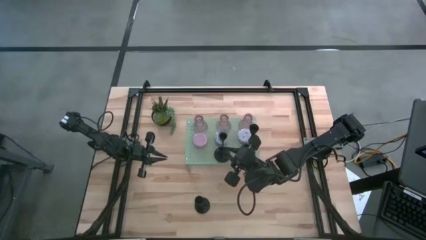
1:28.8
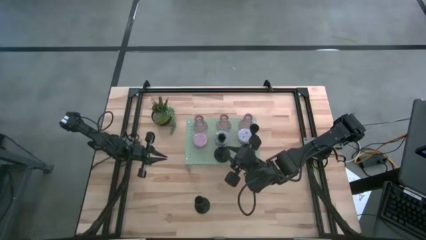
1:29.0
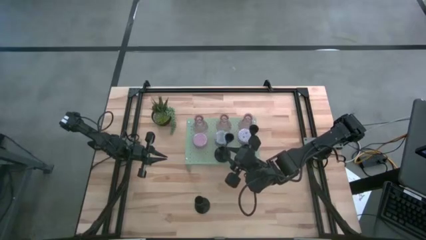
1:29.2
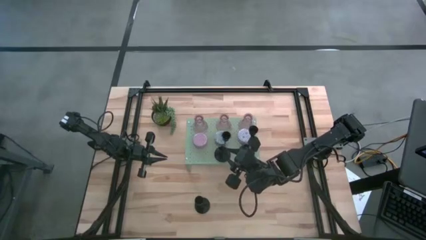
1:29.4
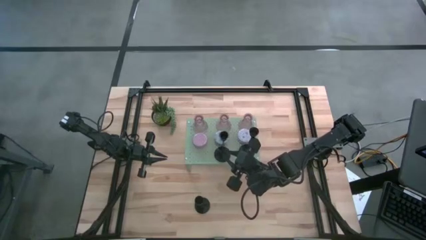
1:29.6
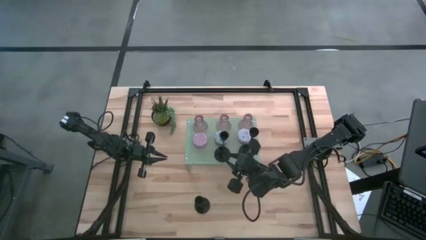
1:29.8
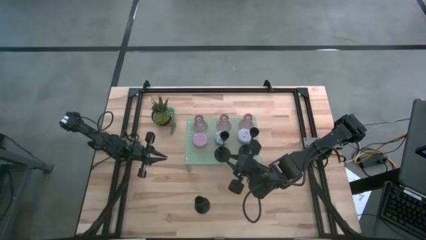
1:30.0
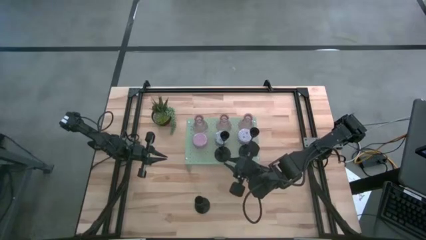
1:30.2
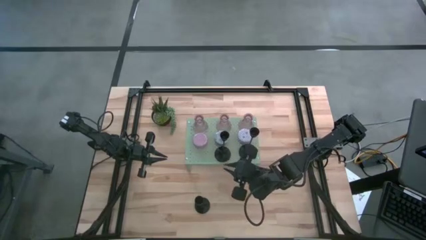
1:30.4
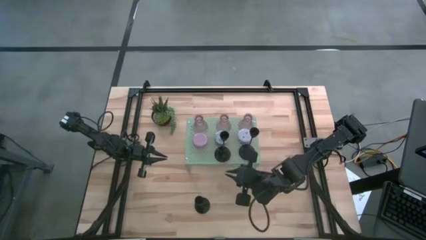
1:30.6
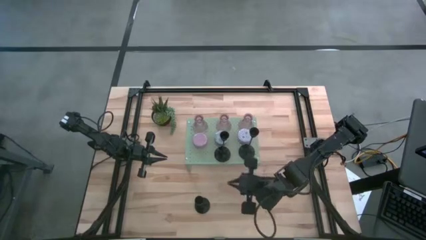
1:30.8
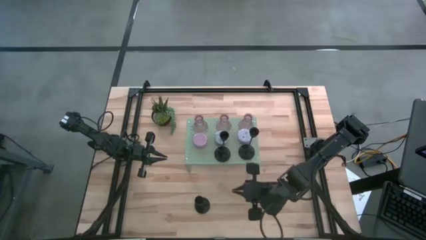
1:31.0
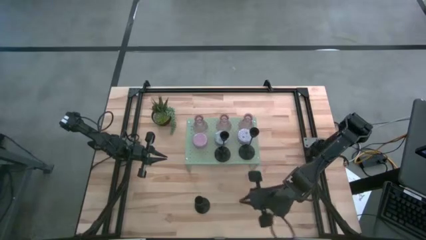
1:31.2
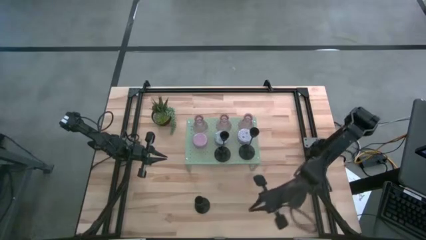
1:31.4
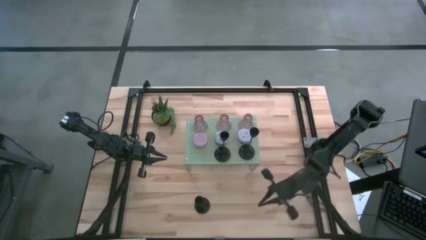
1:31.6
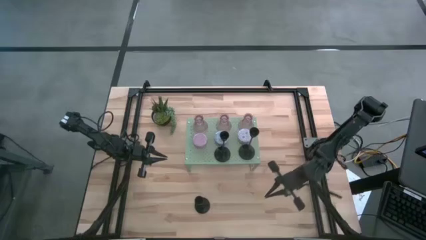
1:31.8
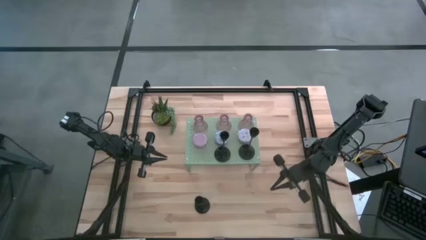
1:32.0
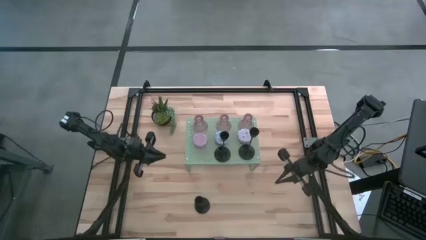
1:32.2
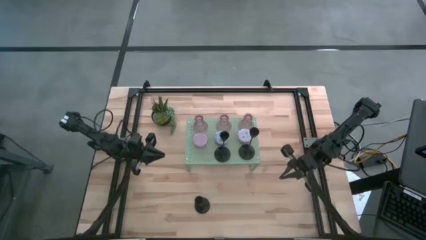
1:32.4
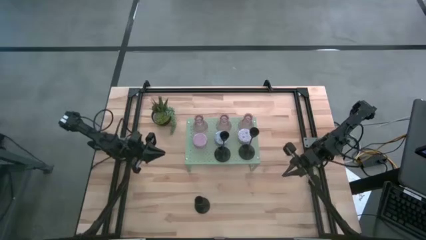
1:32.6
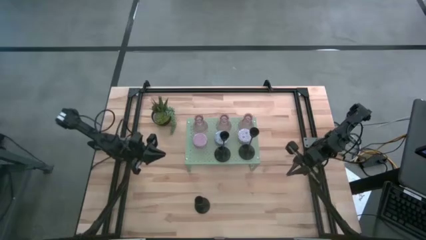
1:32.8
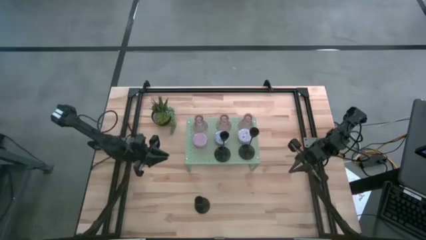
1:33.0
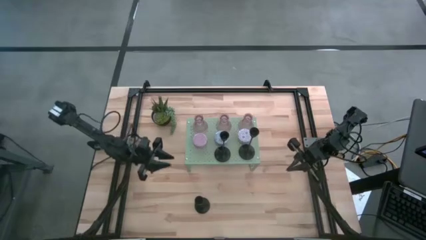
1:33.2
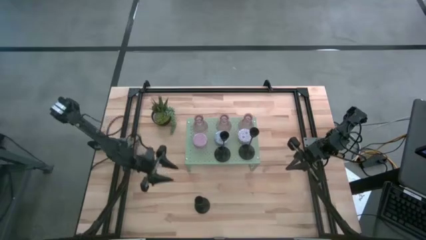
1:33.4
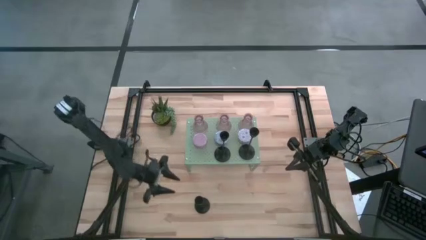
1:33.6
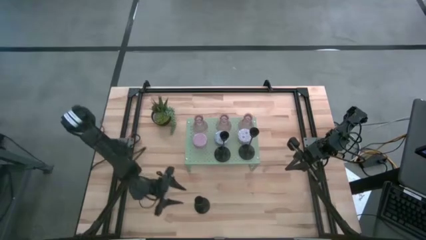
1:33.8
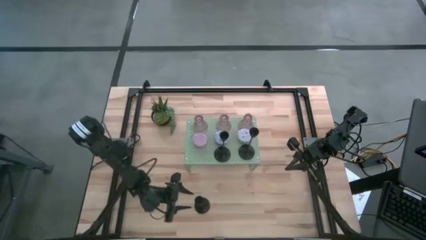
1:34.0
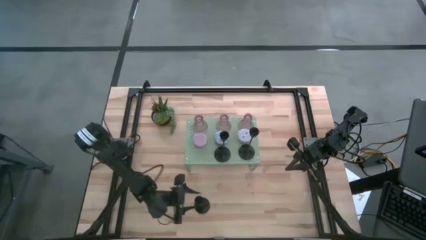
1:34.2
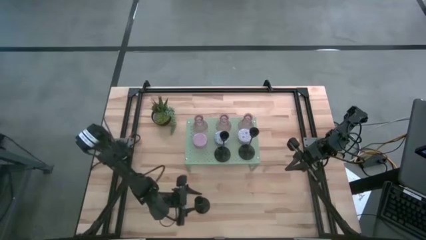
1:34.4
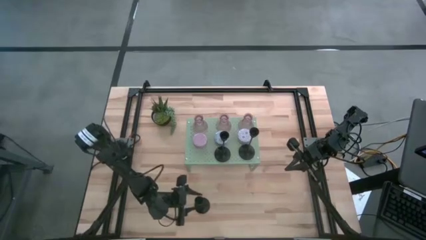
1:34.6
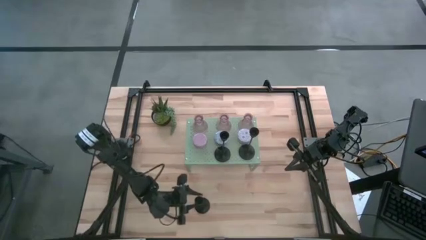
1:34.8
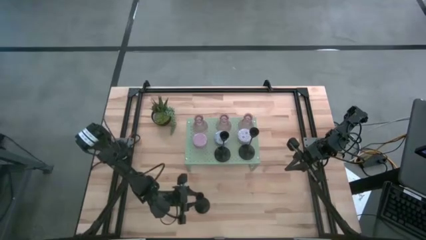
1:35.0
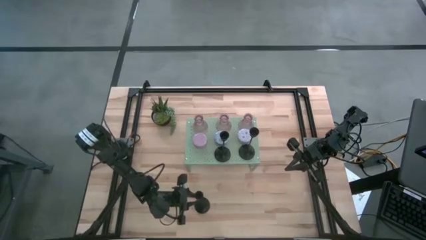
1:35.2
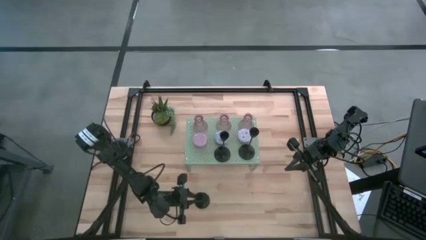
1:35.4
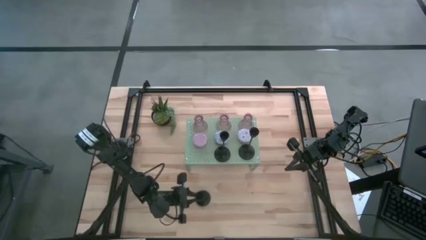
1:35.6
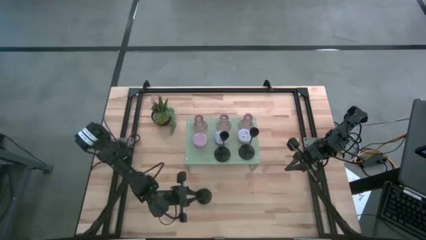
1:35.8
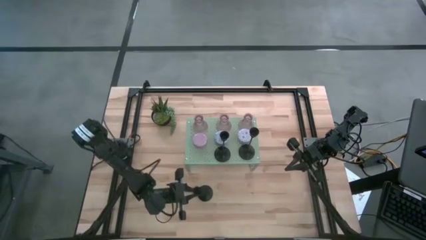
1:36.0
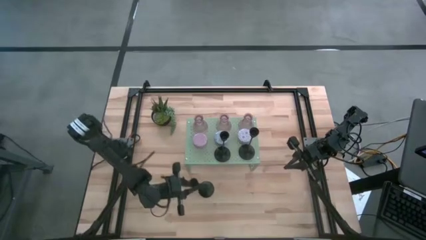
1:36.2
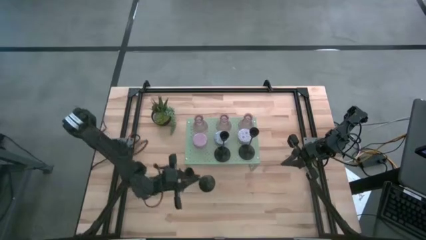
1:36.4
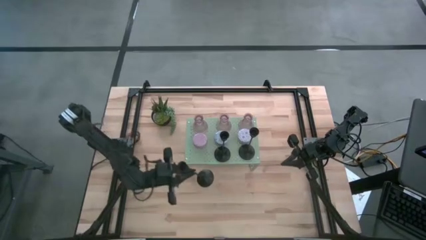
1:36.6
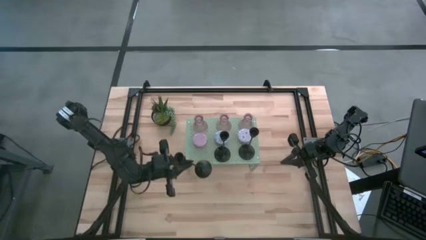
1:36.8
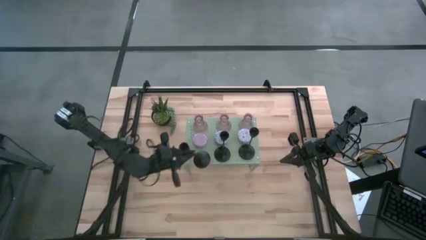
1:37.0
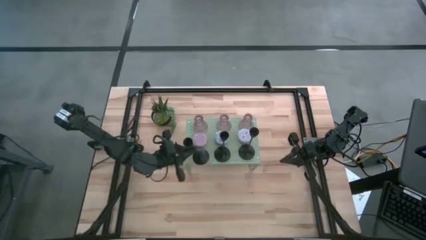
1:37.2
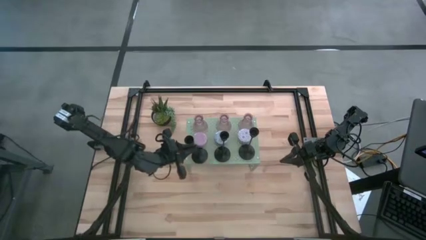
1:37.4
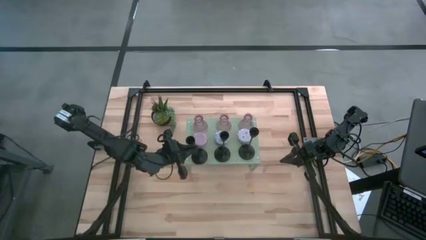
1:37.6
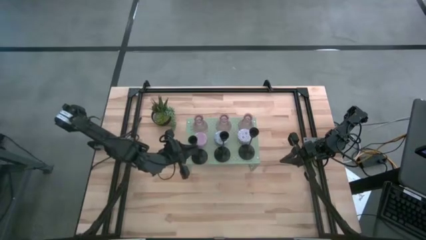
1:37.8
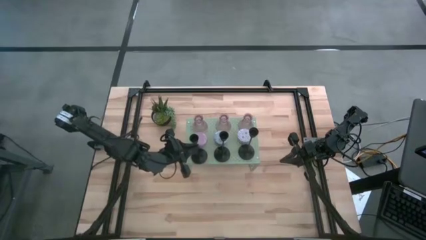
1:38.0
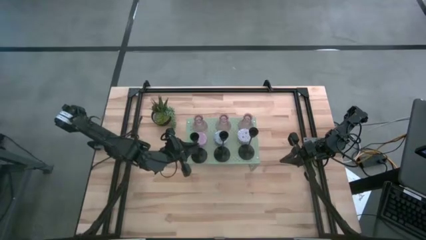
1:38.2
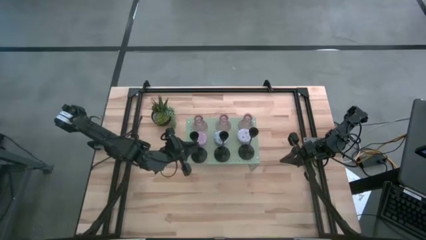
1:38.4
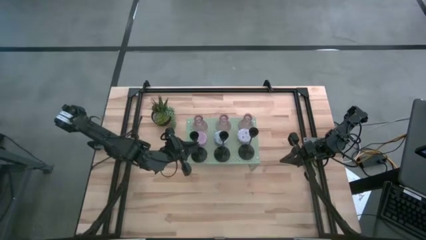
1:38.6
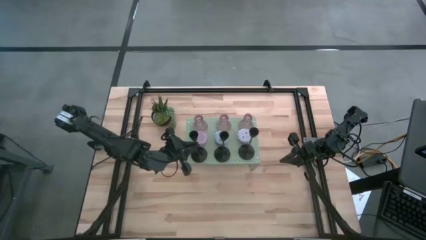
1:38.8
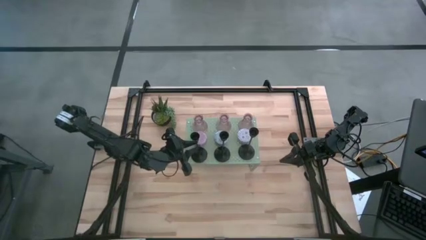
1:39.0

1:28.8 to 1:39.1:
Task: Pick & Place candle stick holders
Put the black candle holder on the shelf

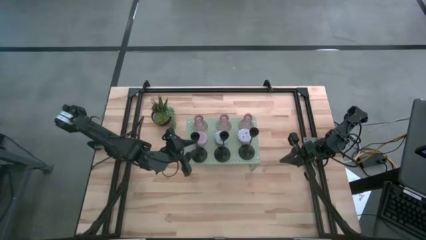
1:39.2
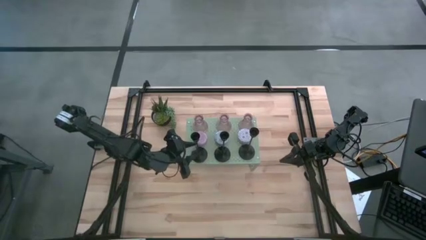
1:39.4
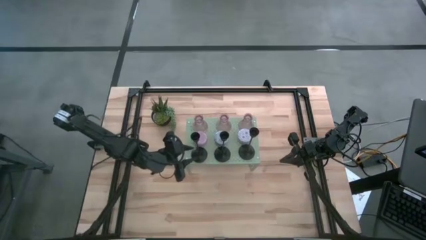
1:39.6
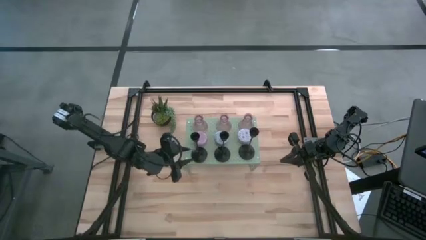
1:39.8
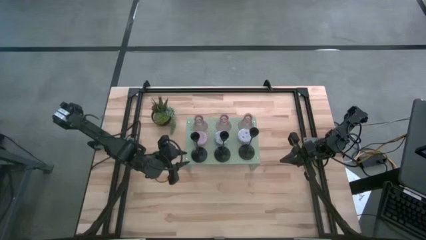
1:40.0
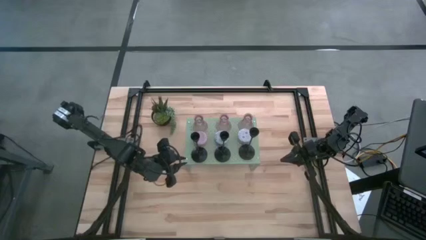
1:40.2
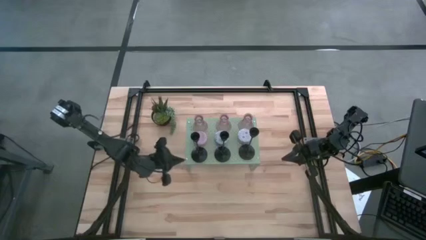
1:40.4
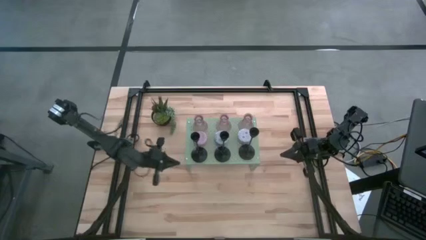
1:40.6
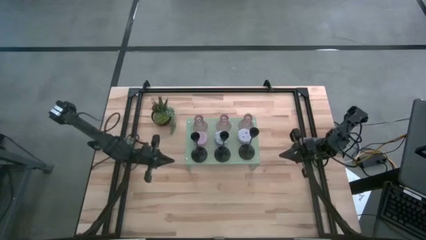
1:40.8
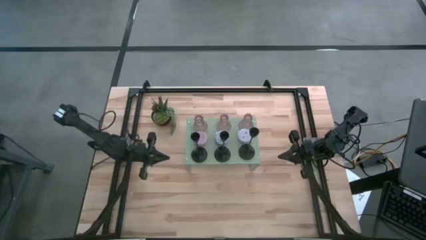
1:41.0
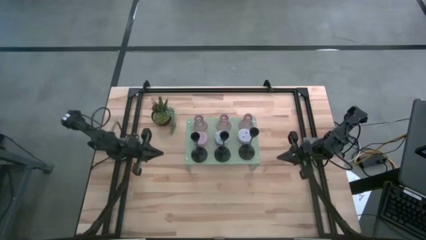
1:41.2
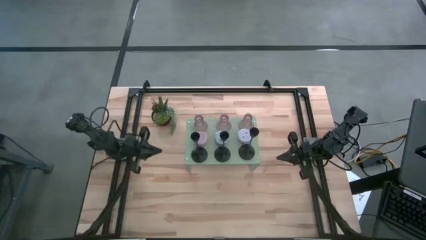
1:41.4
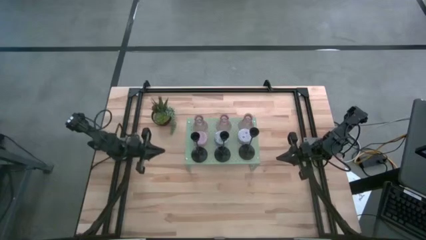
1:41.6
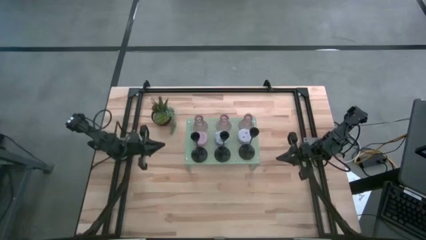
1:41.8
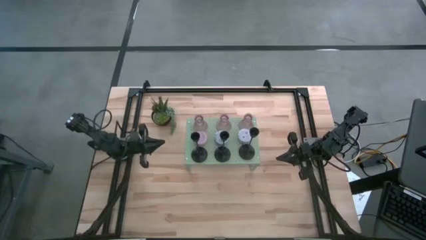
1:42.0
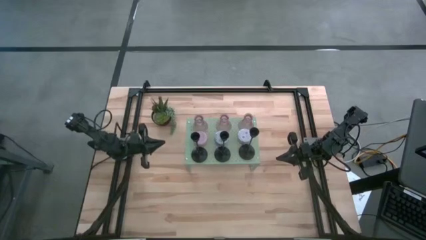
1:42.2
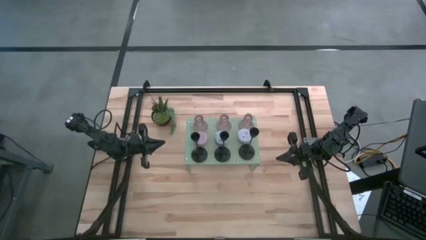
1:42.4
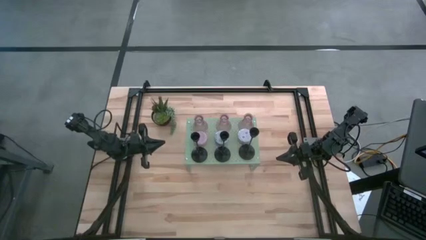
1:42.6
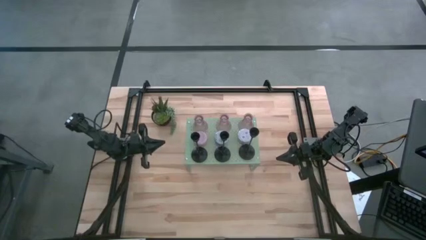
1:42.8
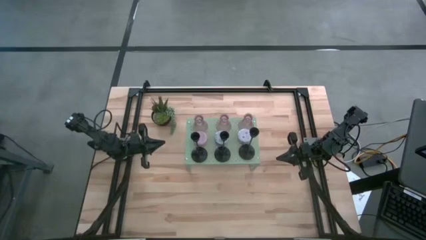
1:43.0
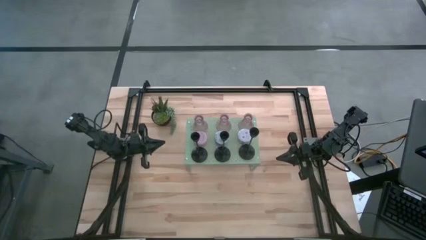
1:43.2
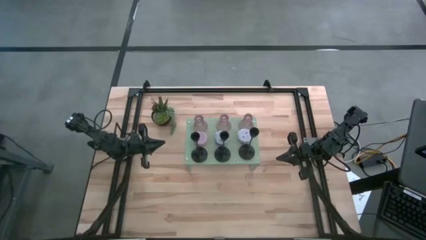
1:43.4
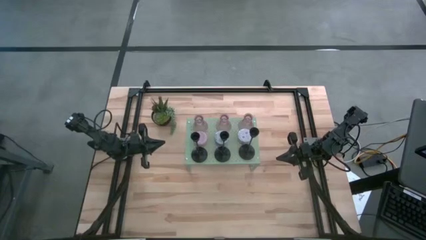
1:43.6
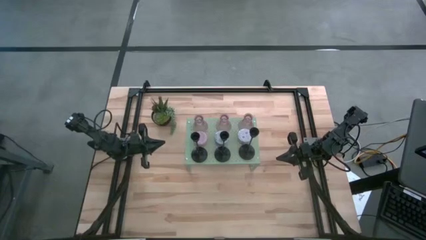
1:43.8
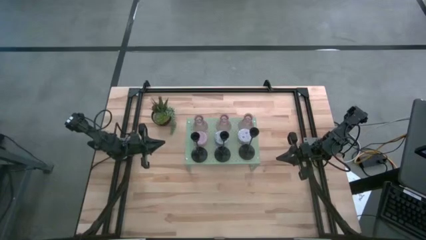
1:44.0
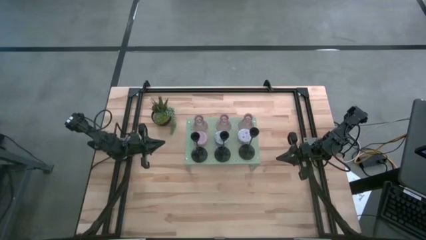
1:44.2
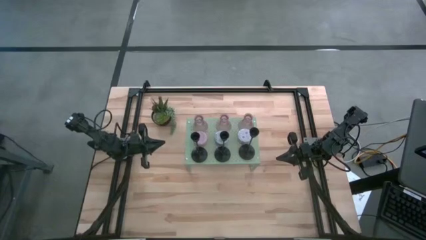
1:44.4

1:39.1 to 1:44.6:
Return to Home Position
